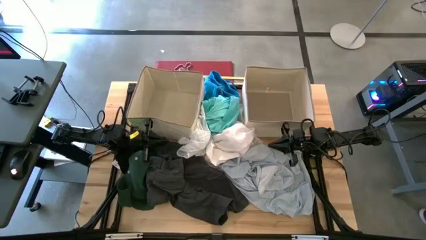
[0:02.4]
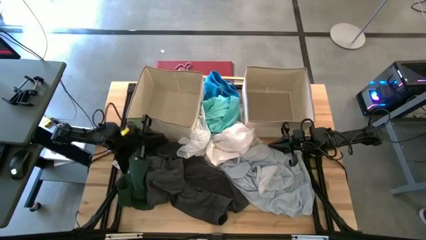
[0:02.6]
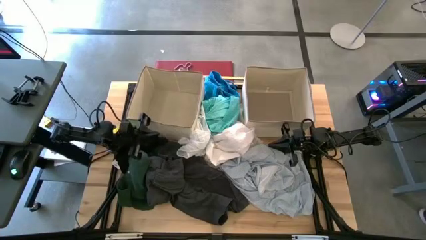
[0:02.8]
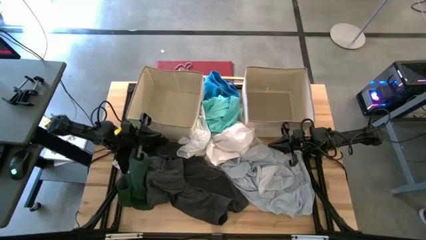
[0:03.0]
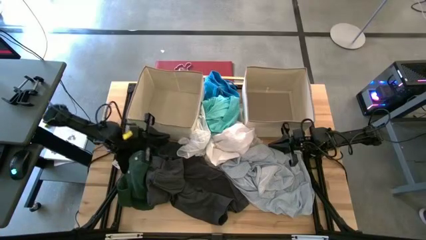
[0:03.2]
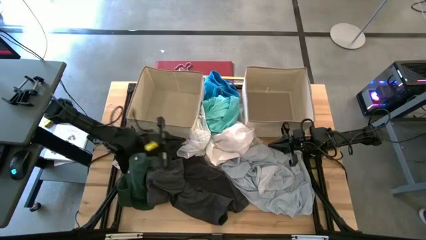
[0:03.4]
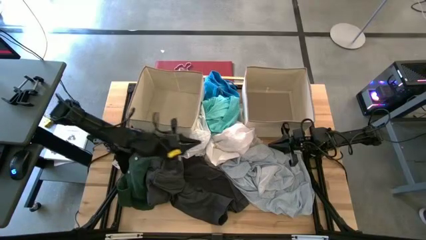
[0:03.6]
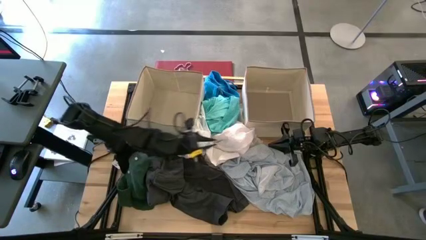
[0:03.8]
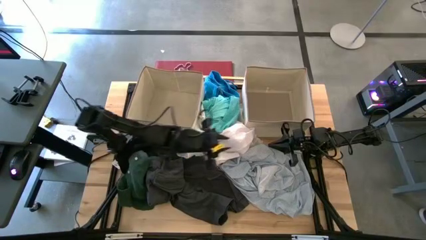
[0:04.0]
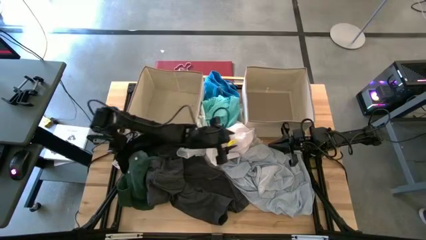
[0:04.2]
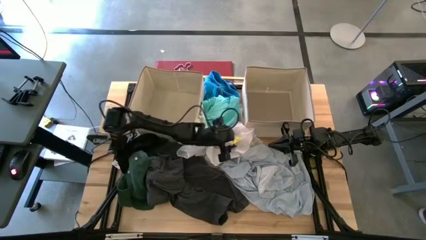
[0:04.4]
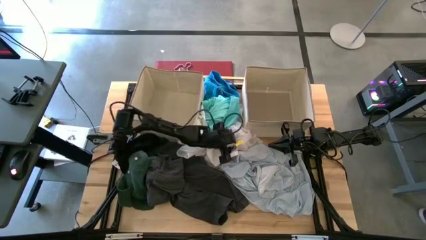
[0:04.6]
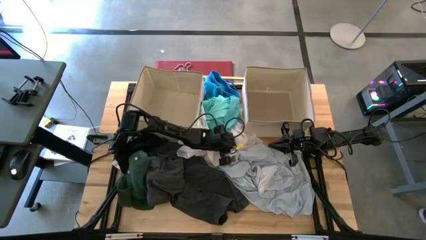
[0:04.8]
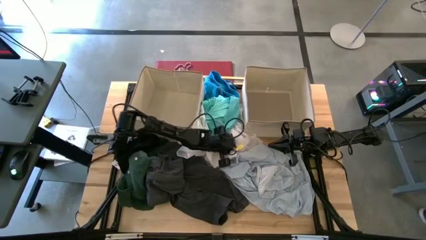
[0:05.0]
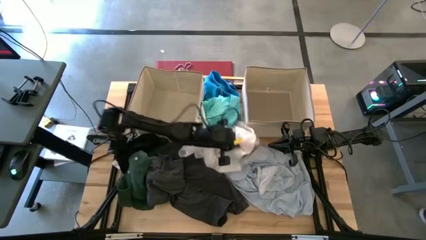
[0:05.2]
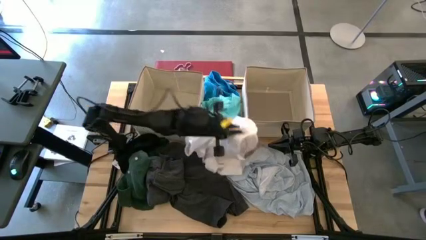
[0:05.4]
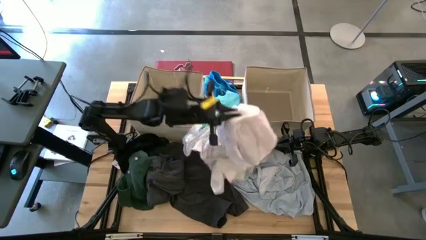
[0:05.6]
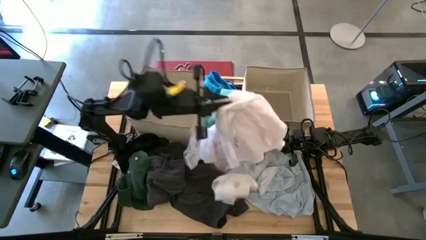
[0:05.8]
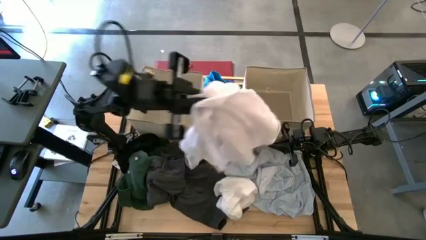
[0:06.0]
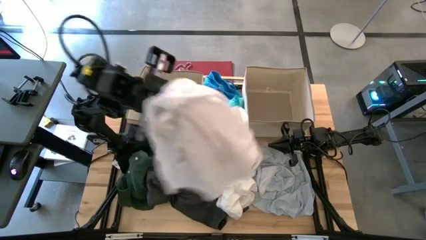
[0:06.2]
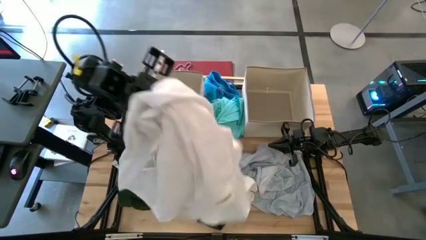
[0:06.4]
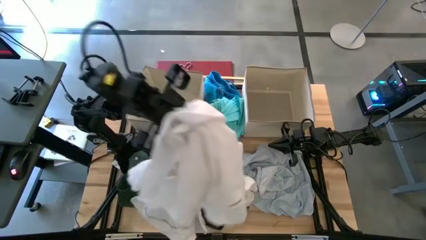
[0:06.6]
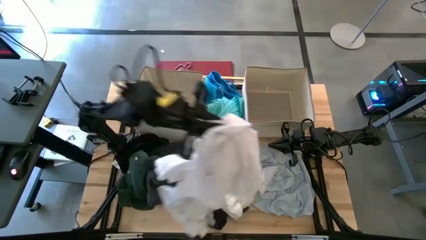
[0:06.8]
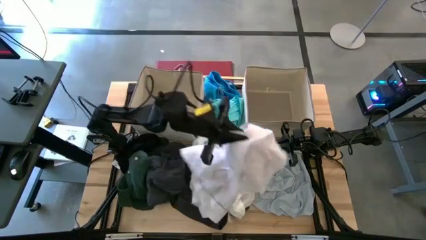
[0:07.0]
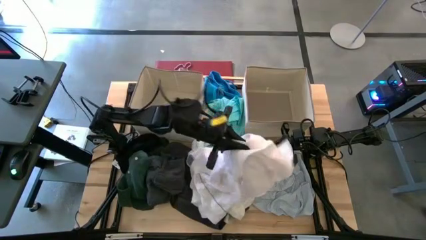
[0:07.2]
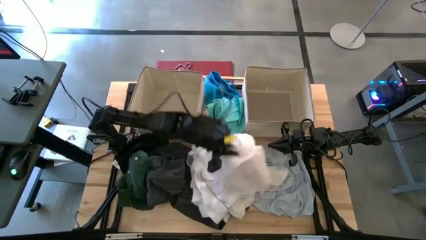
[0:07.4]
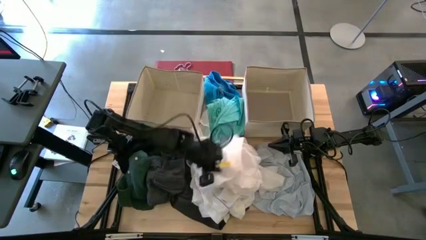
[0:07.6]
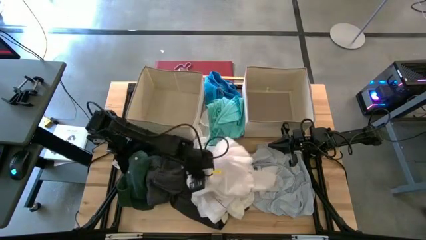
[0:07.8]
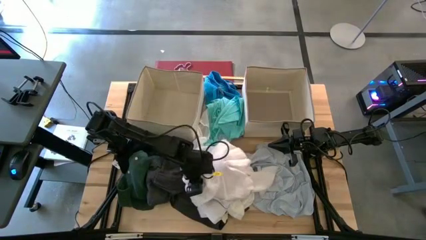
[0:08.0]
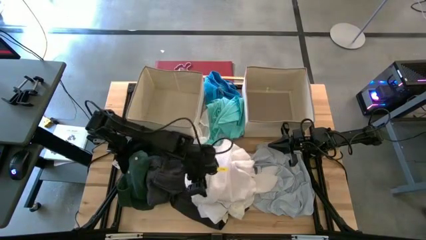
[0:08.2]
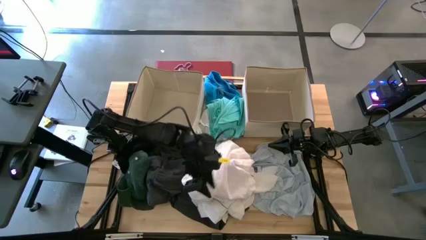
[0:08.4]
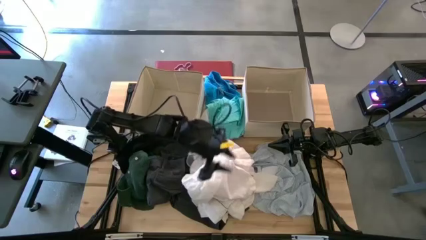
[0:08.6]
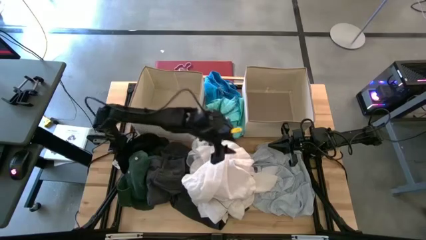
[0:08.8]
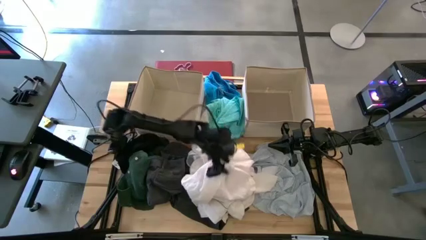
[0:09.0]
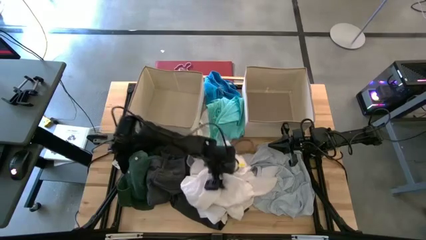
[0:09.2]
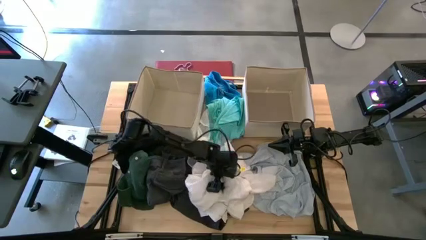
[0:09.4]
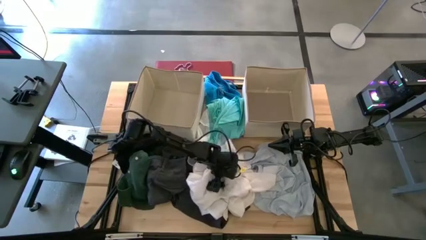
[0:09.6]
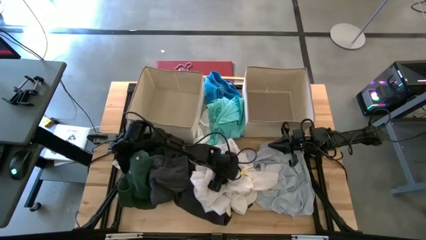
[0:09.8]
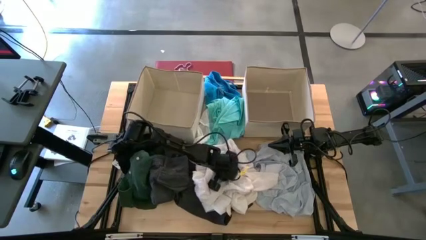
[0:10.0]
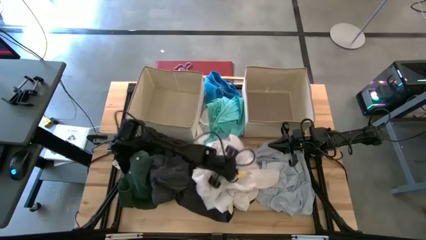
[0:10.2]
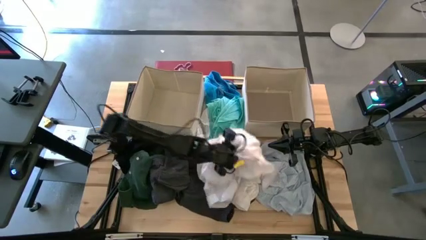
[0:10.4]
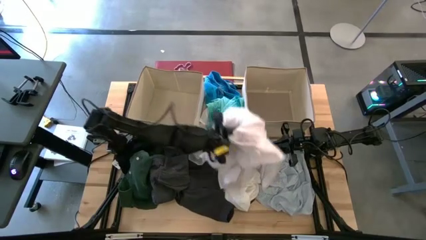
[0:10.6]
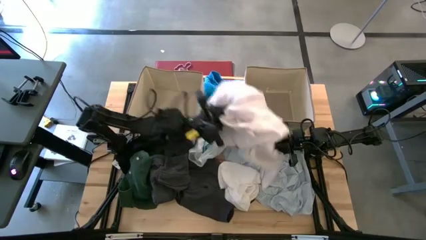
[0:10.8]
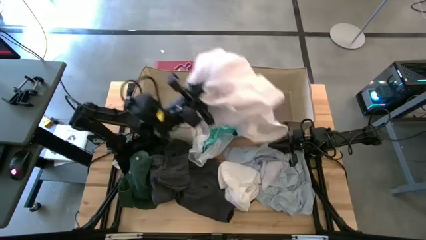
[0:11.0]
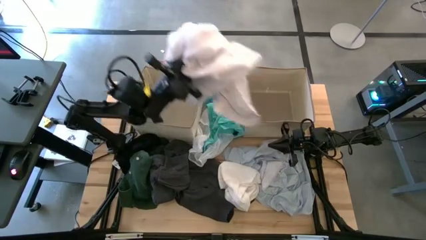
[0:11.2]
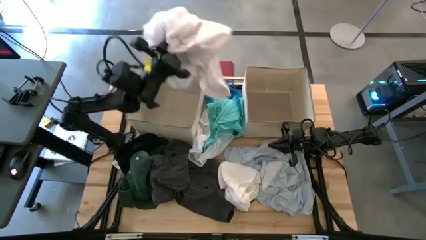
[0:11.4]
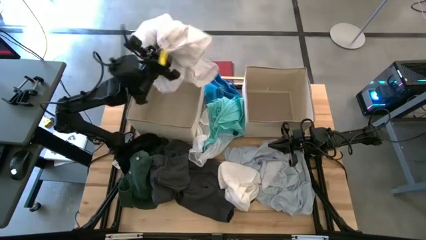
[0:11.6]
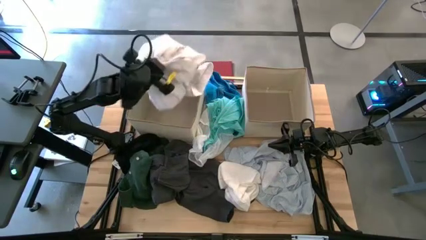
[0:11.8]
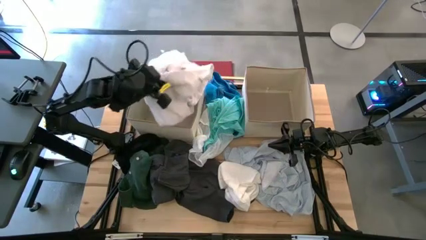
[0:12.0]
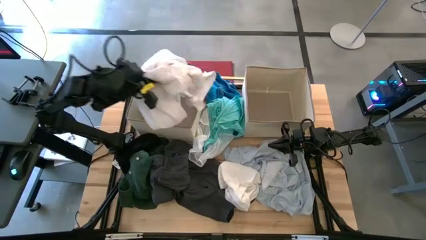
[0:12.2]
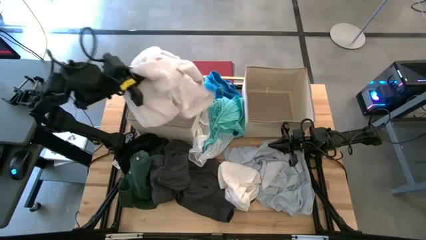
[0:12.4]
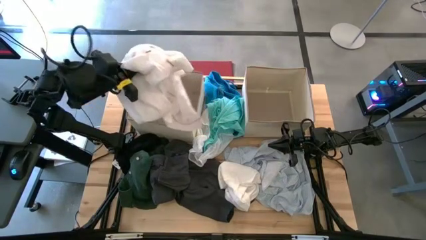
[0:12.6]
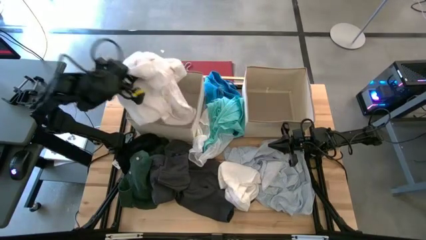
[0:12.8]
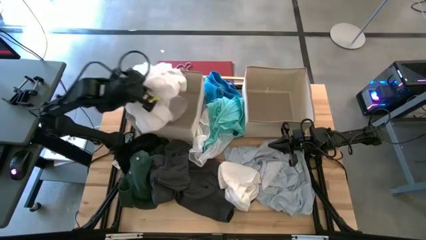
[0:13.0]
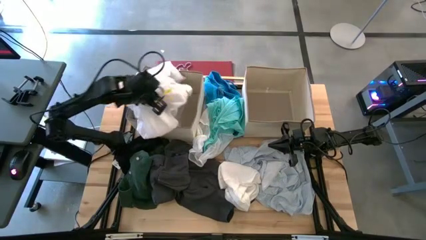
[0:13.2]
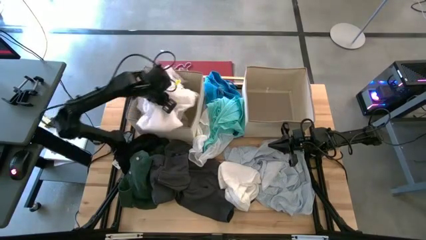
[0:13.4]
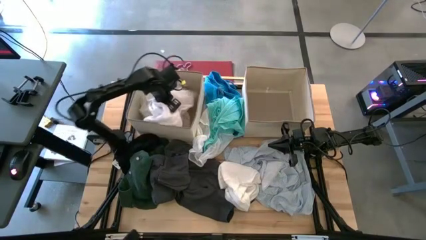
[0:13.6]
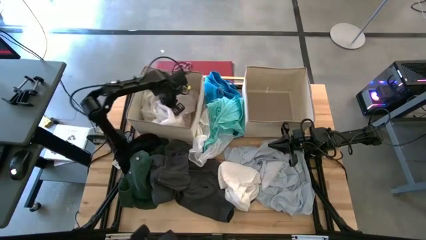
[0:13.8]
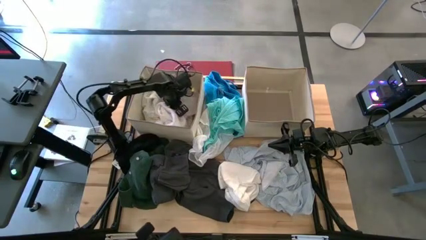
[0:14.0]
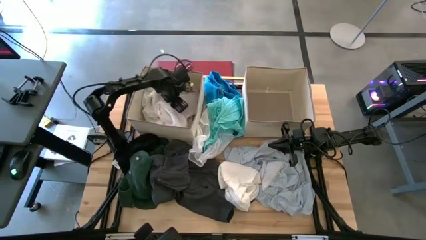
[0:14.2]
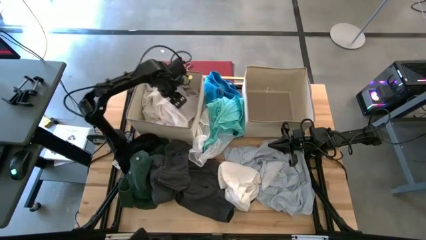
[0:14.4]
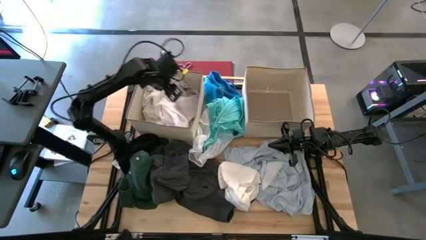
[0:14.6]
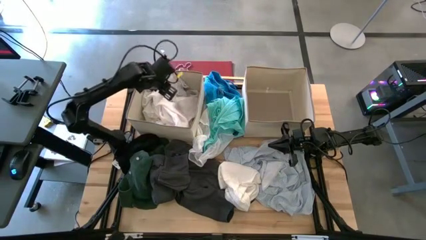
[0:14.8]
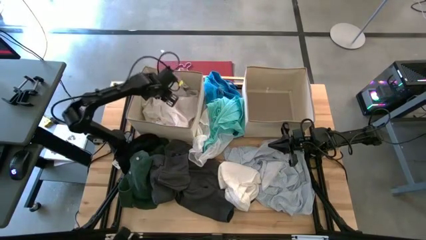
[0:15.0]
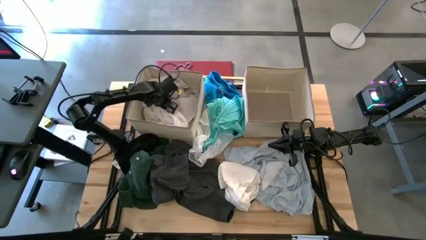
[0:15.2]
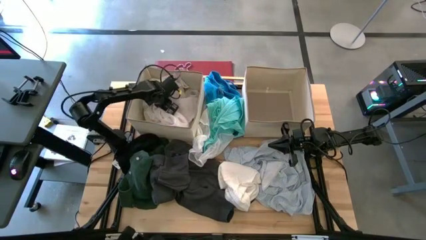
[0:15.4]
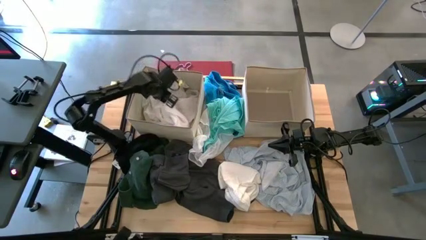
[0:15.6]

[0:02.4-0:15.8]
Task: Sort clothes
Put the white shirt into the left laundry organizer

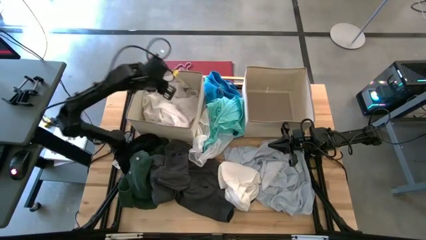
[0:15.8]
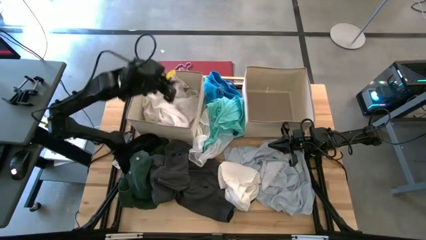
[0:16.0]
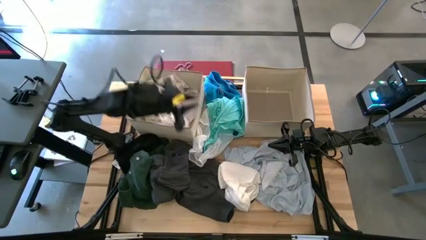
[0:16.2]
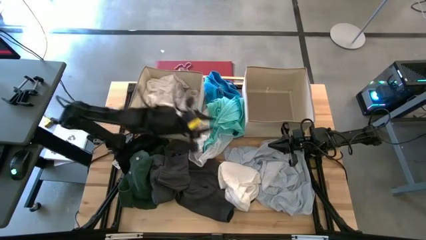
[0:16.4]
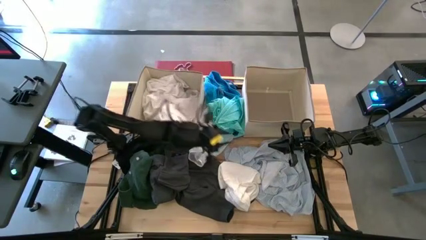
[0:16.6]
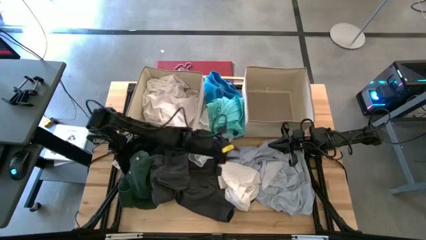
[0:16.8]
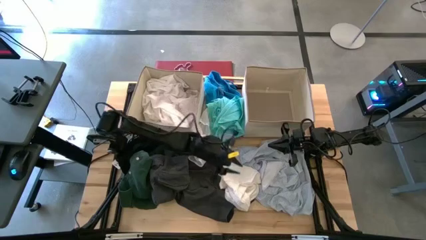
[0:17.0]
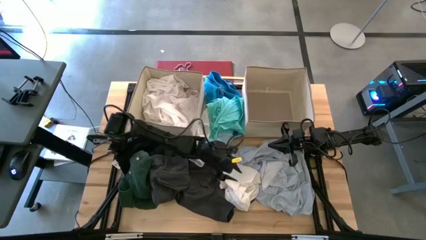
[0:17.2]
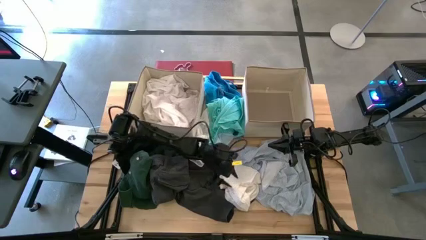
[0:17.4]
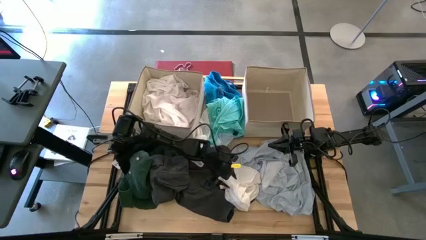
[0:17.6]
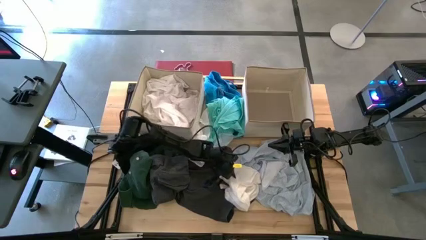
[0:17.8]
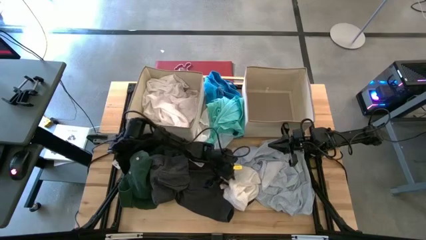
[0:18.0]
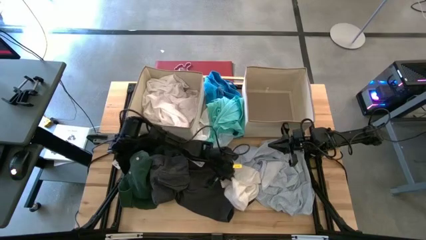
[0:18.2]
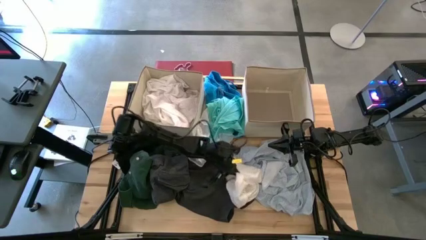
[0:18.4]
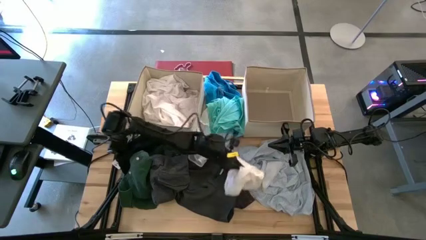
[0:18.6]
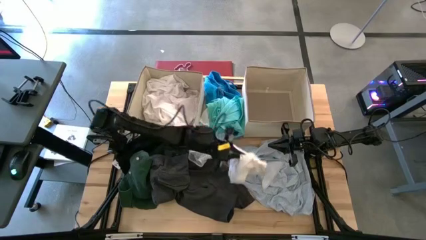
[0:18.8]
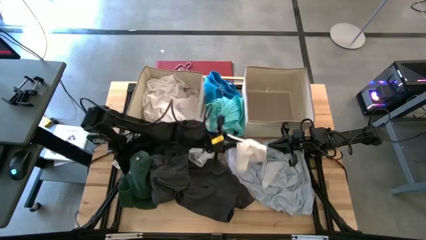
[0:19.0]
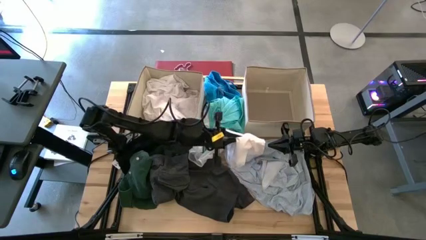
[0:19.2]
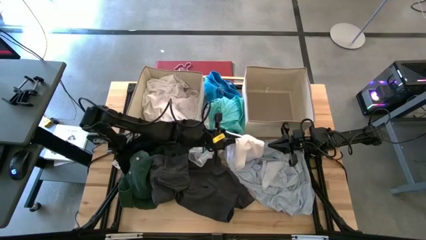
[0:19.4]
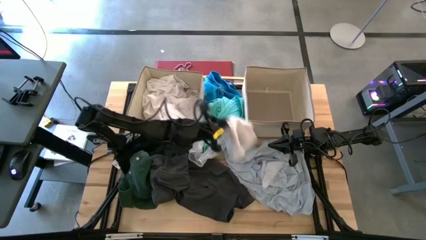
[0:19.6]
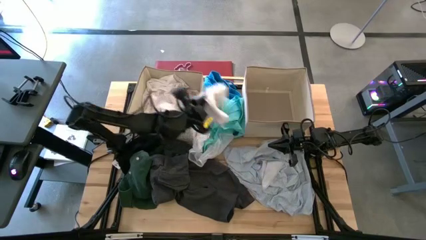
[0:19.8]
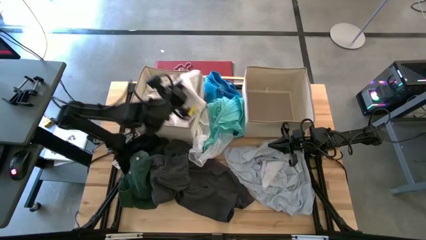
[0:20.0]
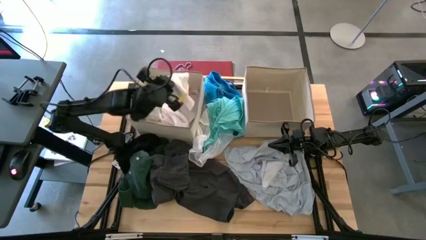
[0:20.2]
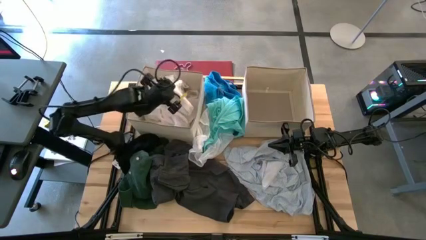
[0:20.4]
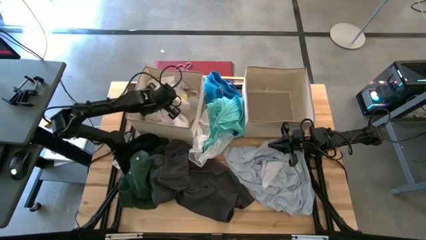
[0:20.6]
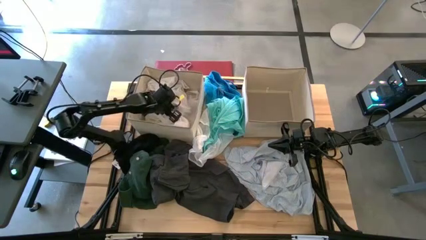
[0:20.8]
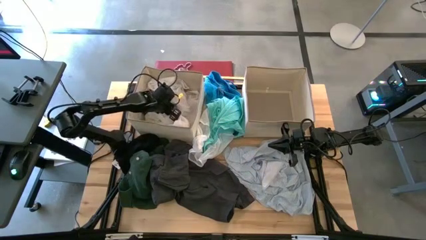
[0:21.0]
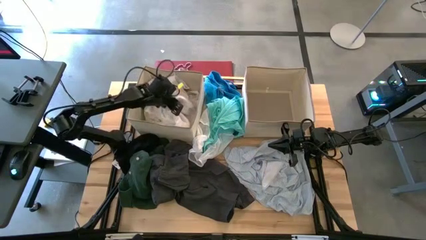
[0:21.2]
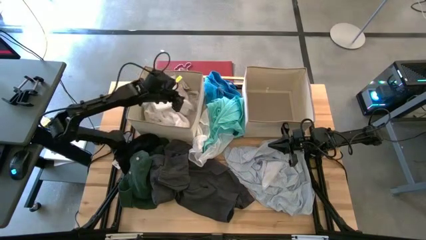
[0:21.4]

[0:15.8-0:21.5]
Put the white boxer into the left laundry organizer
